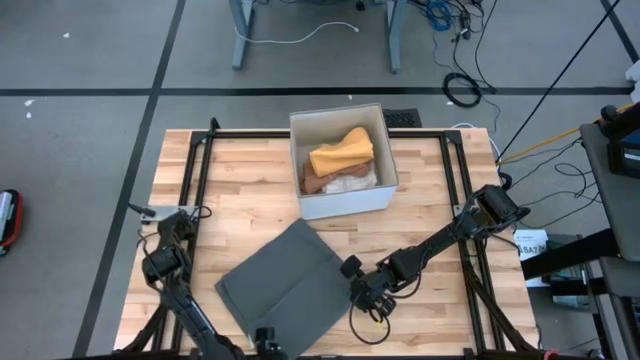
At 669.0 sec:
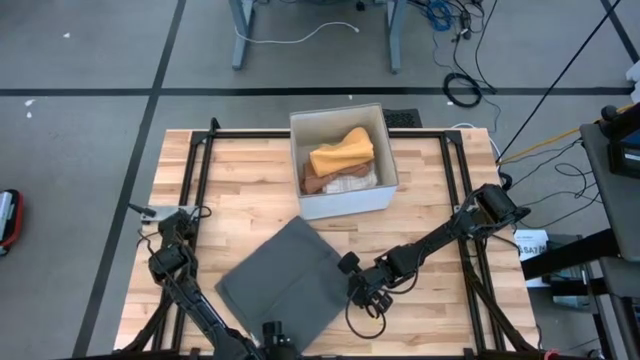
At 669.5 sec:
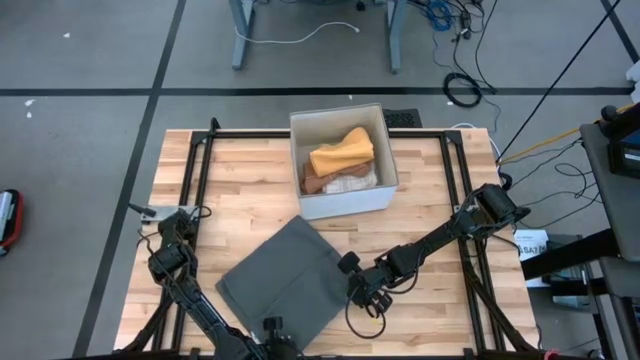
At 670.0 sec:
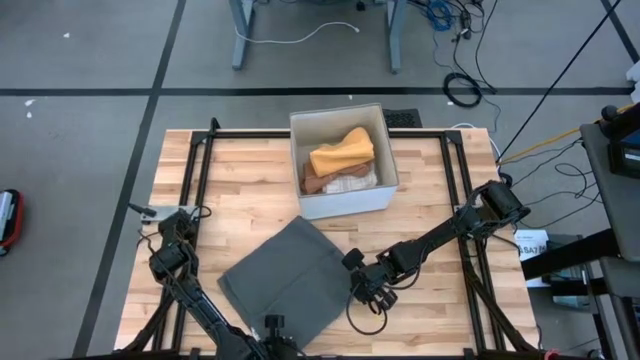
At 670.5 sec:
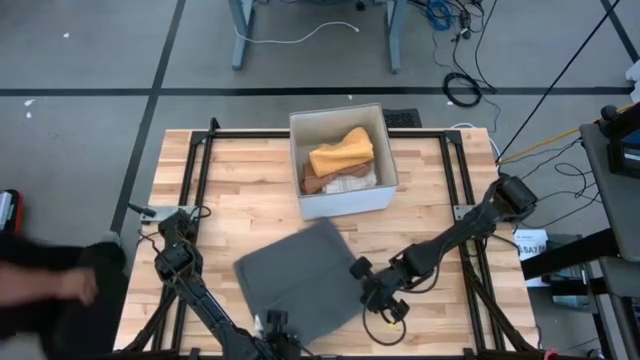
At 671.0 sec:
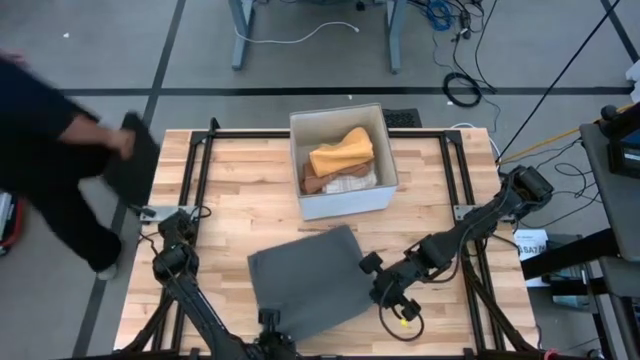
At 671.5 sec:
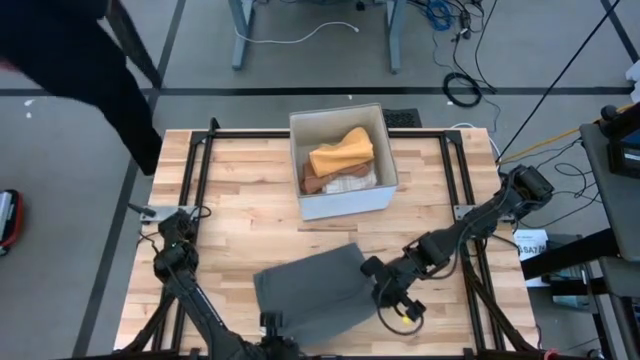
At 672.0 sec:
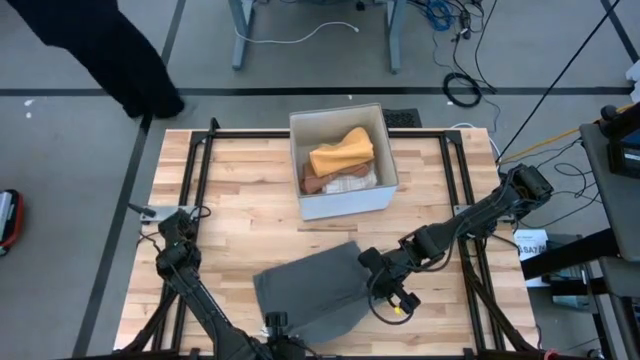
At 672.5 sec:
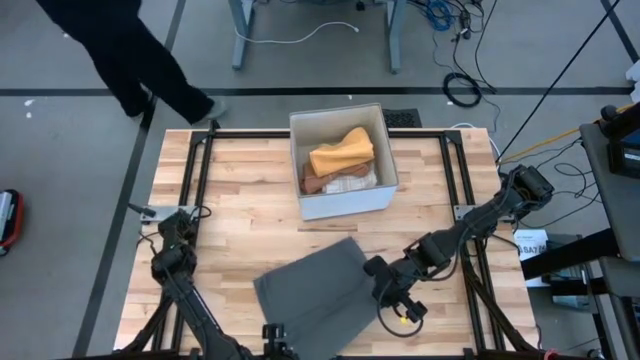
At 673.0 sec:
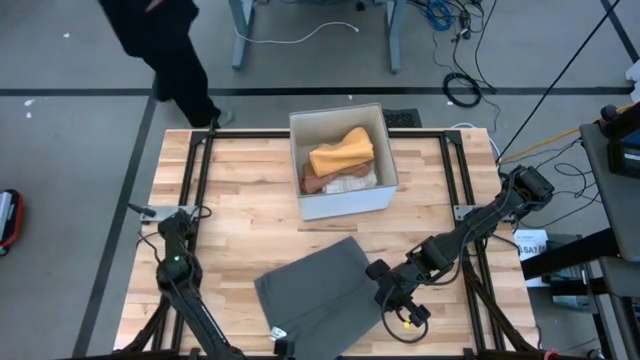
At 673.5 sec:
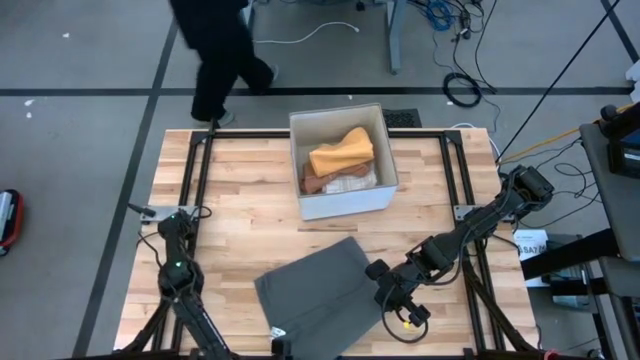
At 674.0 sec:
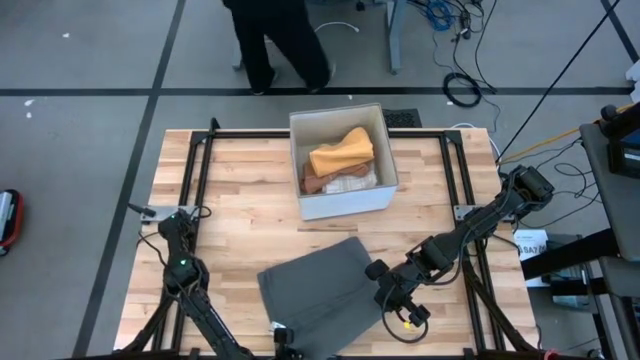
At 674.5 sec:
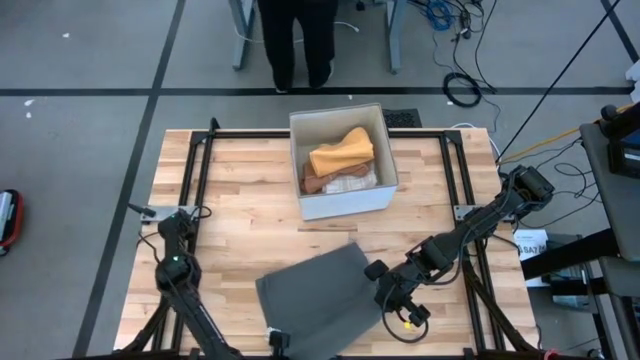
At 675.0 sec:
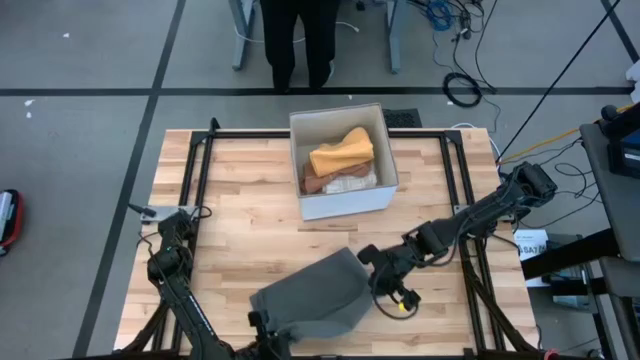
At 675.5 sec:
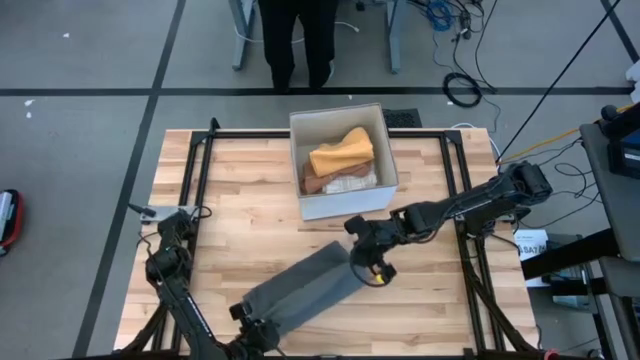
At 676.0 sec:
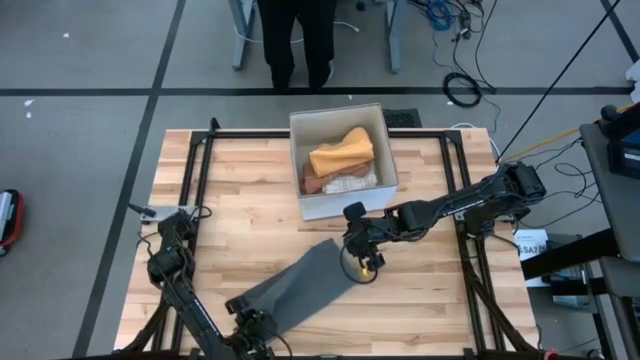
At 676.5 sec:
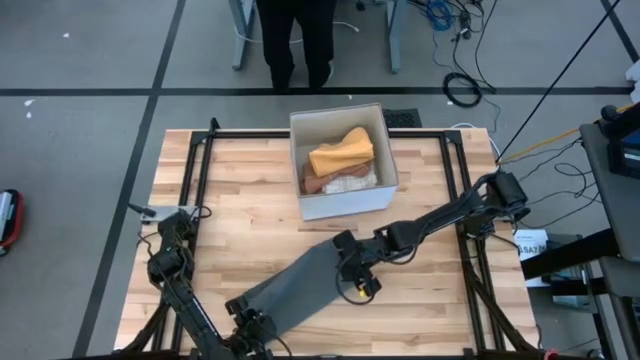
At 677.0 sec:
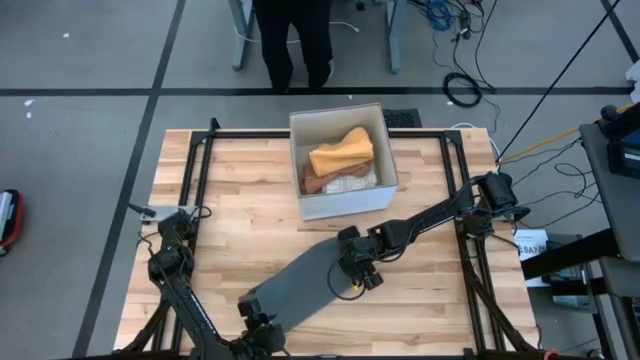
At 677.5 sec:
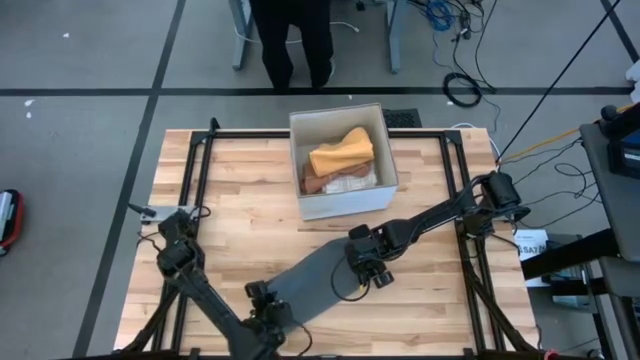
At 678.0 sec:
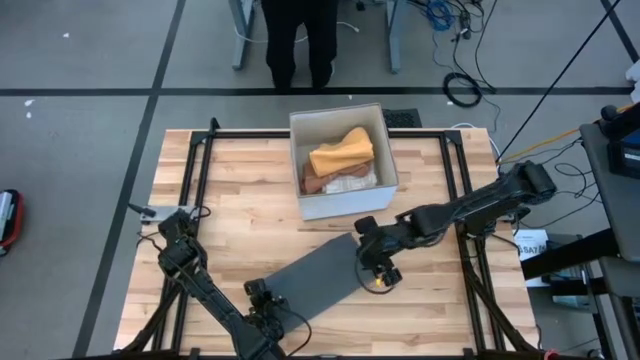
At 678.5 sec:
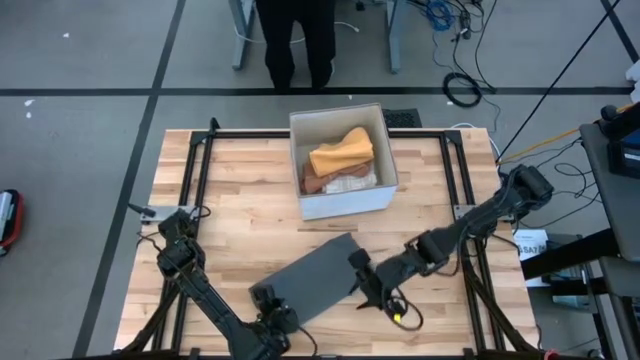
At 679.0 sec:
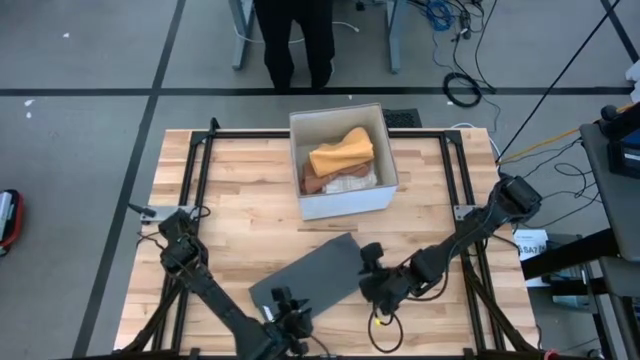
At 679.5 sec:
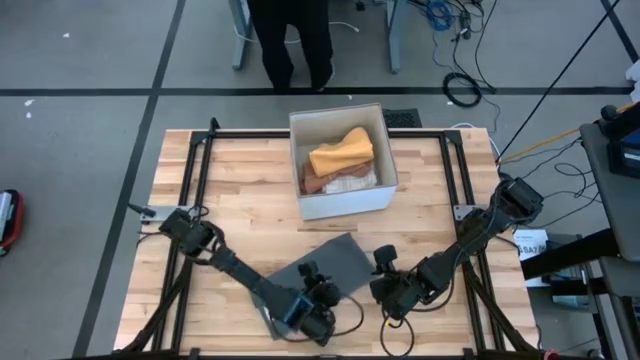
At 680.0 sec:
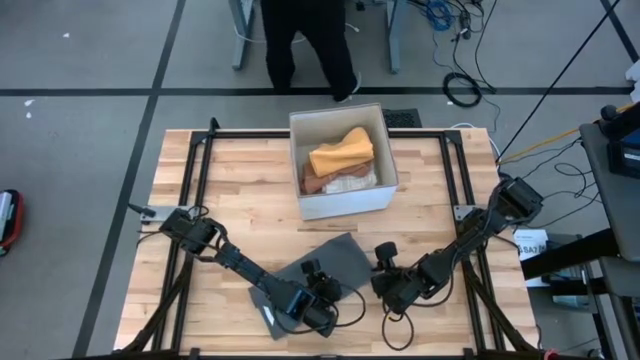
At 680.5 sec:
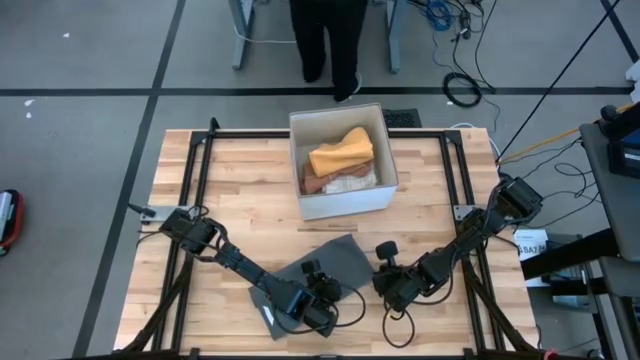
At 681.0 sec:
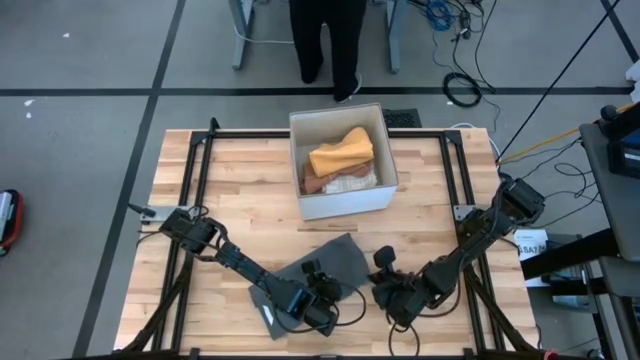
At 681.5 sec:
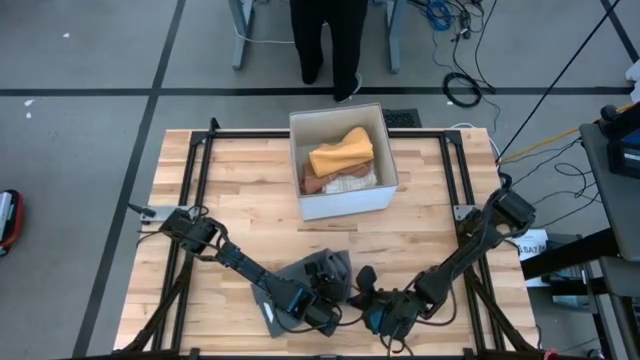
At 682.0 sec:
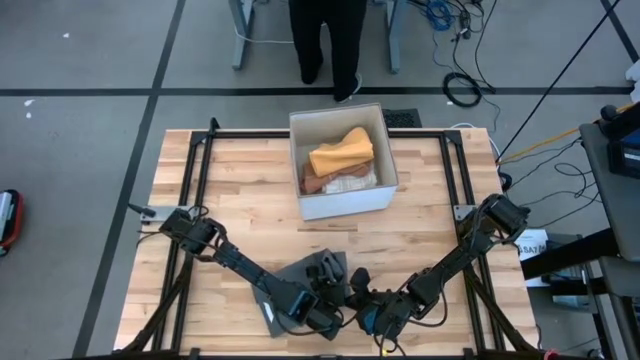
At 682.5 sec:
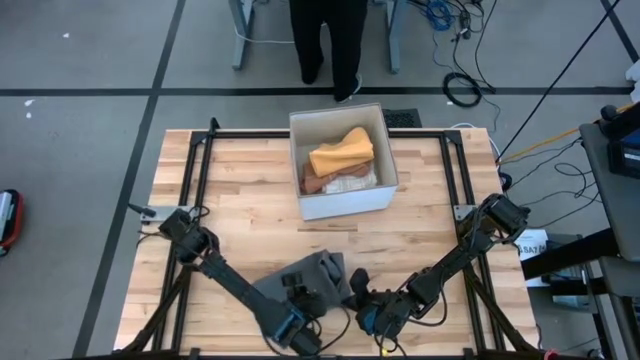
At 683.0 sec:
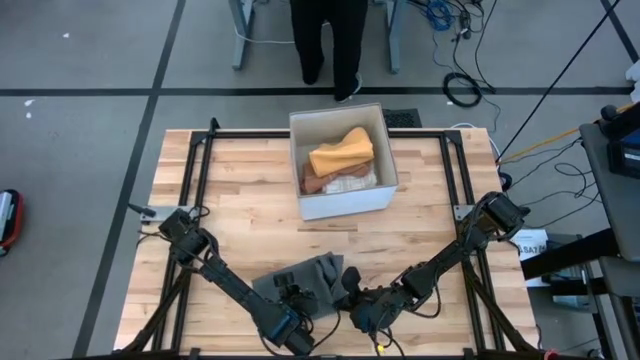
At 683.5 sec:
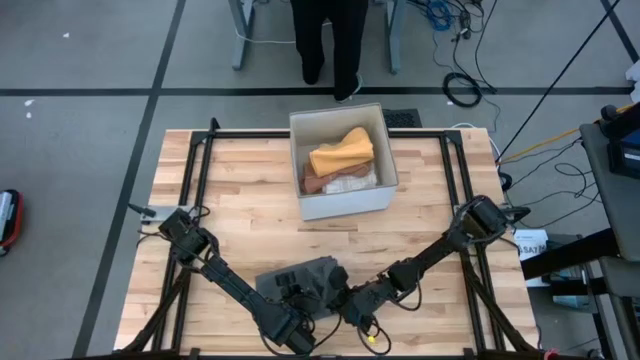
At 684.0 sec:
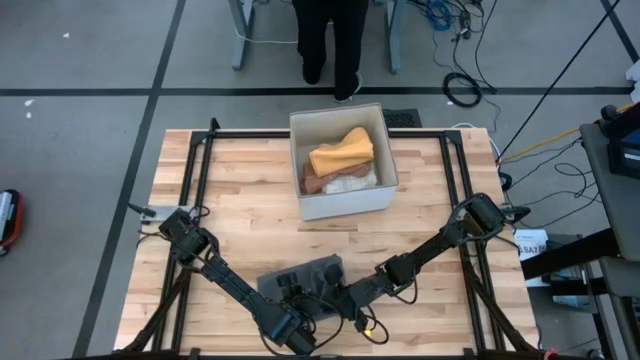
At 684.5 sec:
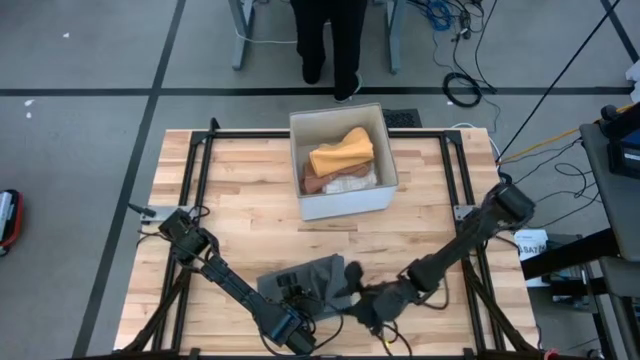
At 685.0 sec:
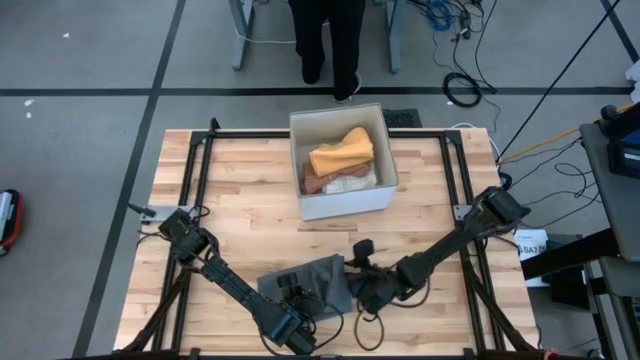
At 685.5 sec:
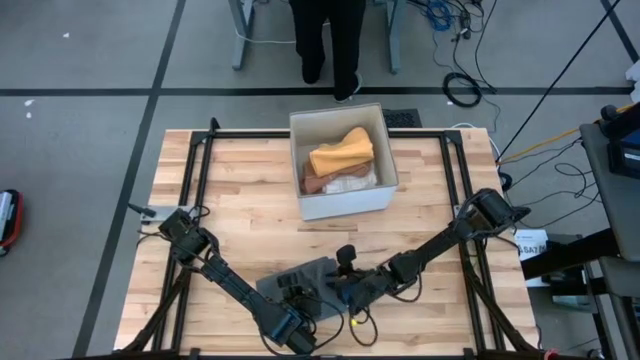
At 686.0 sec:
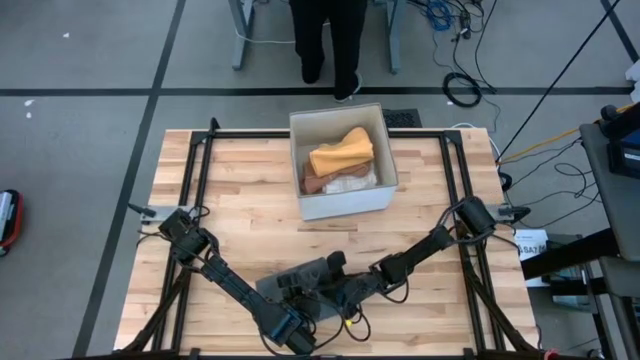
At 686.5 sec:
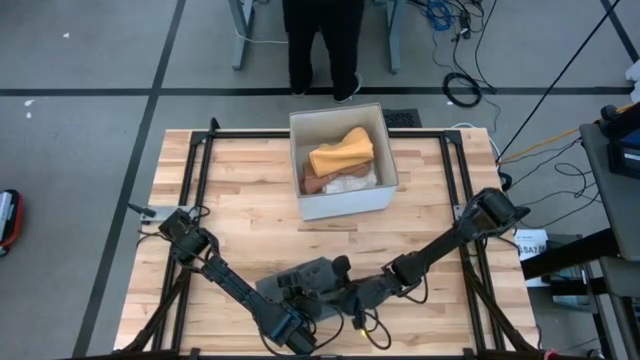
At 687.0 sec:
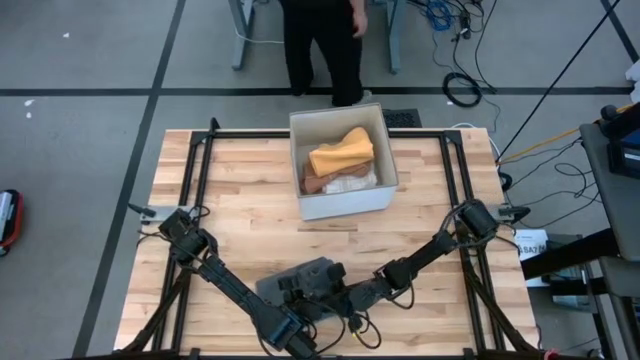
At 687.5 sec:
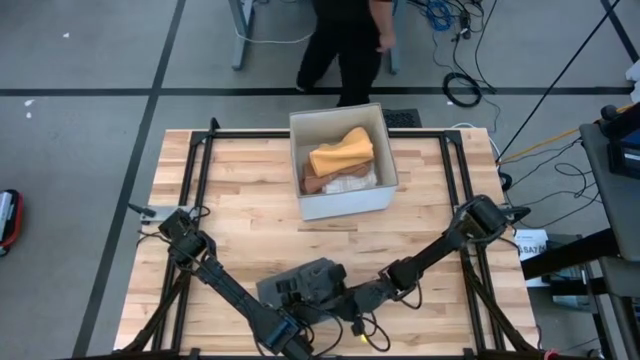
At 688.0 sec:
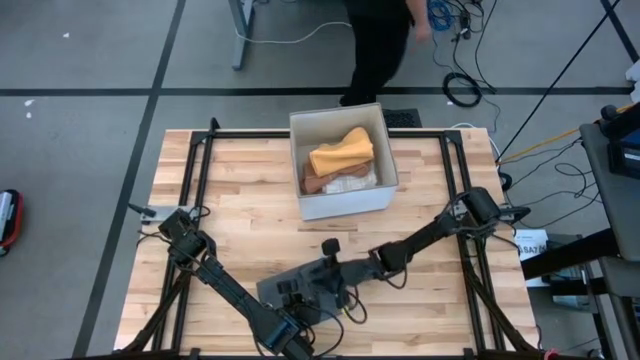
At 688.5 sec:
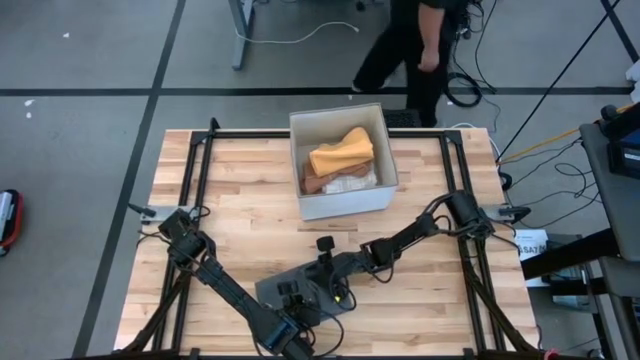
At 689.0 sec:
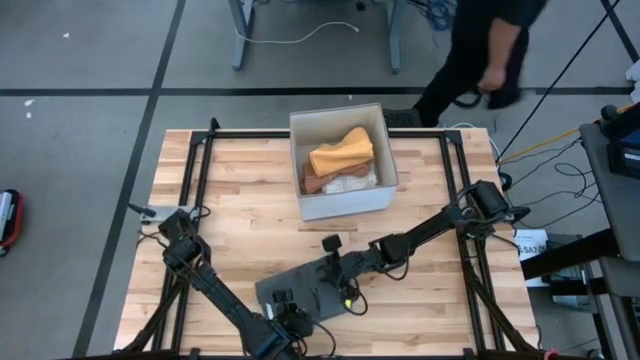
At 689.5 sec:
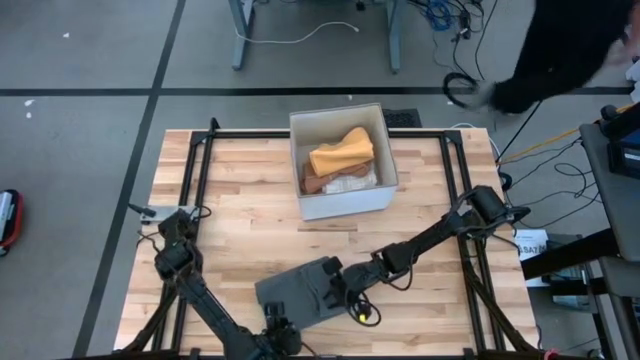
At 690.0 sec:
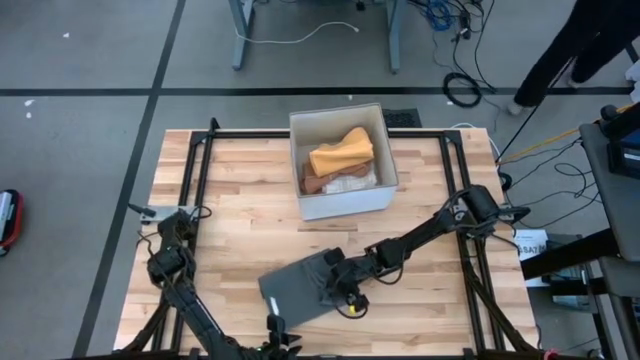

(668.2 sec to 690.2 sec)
Task: Fold towel
Fold the orange towel
